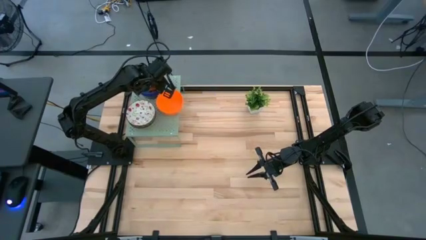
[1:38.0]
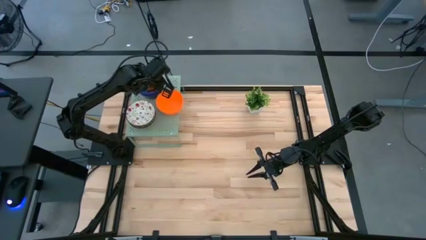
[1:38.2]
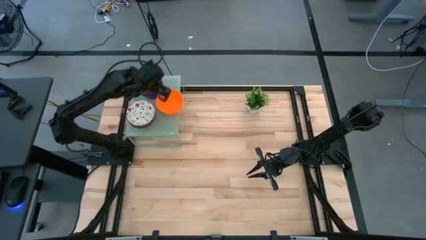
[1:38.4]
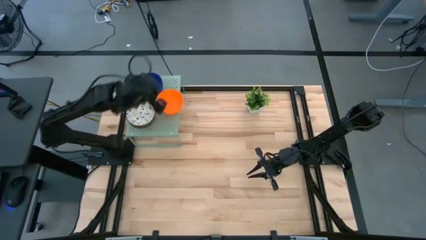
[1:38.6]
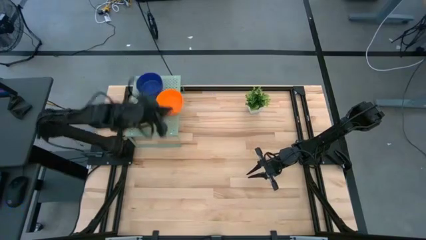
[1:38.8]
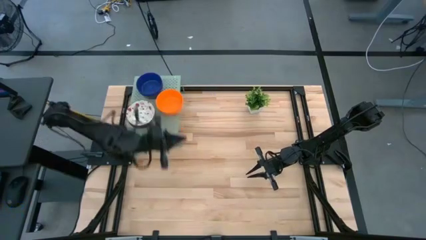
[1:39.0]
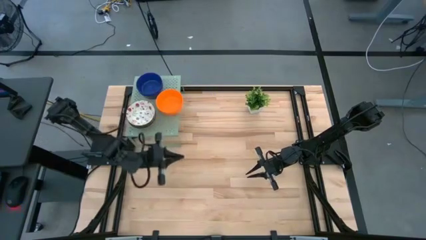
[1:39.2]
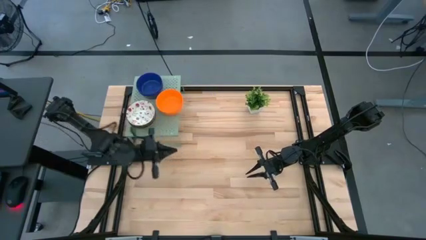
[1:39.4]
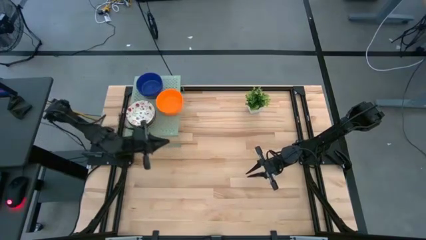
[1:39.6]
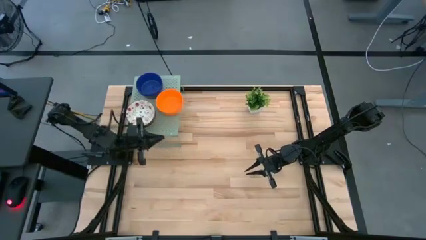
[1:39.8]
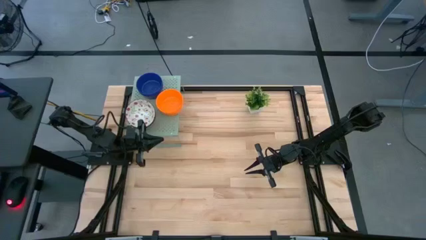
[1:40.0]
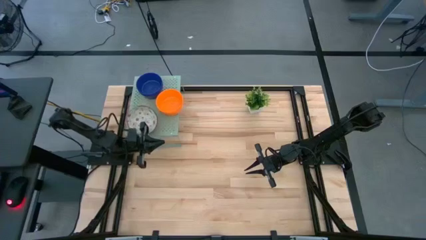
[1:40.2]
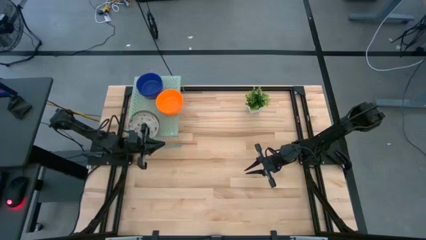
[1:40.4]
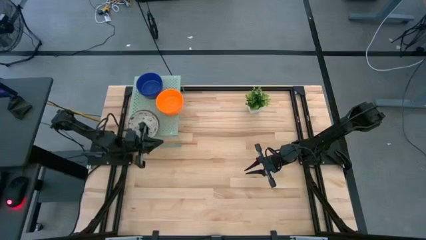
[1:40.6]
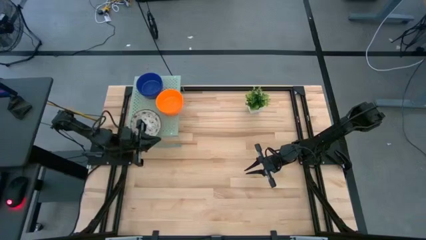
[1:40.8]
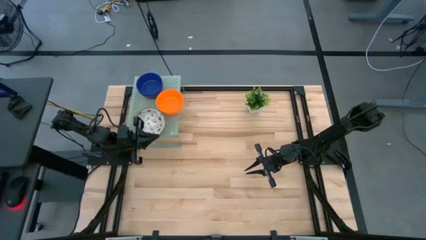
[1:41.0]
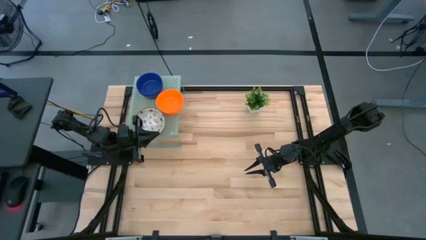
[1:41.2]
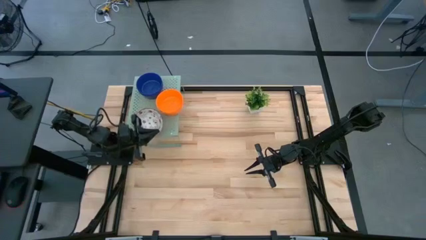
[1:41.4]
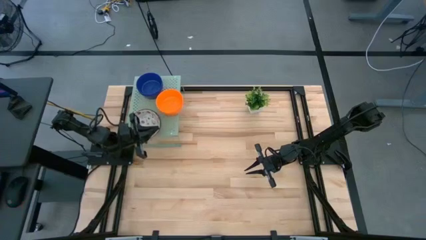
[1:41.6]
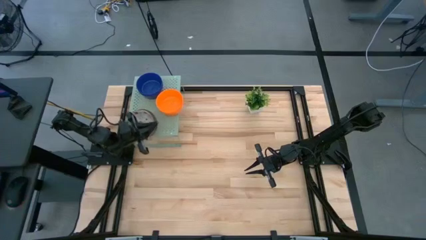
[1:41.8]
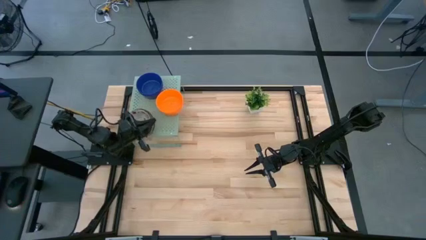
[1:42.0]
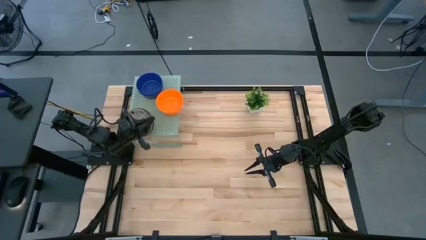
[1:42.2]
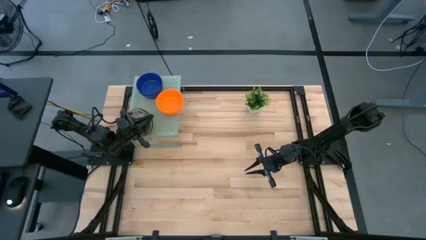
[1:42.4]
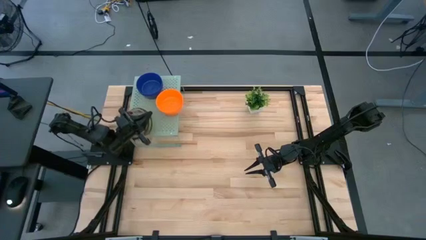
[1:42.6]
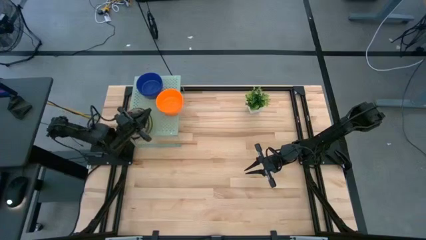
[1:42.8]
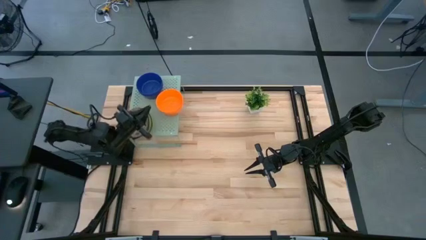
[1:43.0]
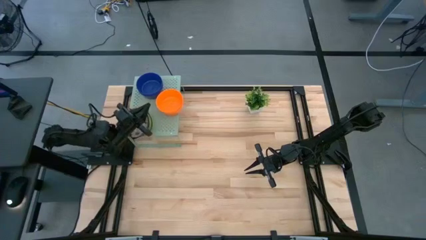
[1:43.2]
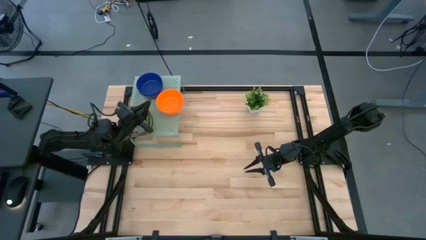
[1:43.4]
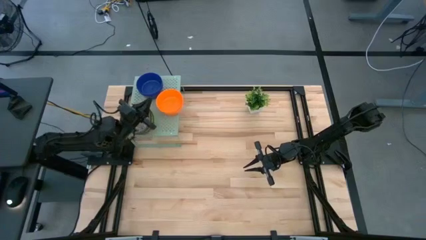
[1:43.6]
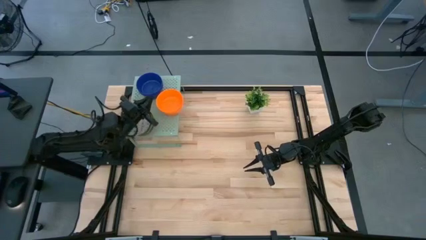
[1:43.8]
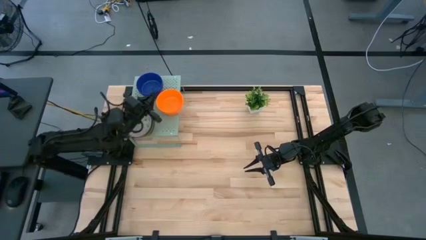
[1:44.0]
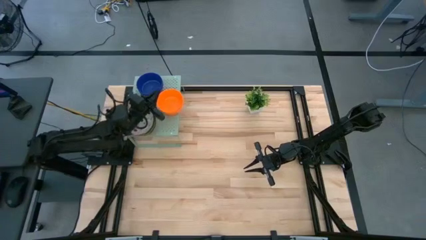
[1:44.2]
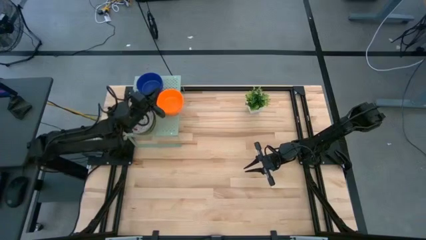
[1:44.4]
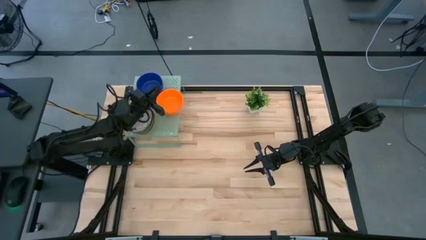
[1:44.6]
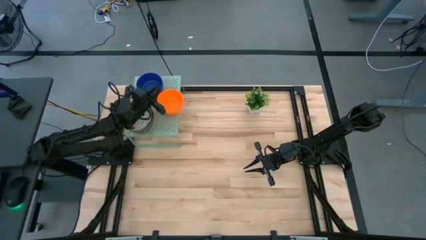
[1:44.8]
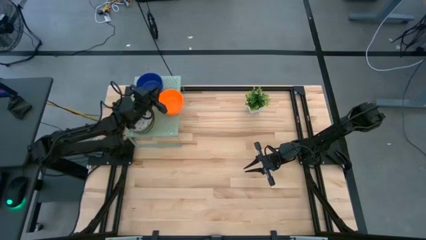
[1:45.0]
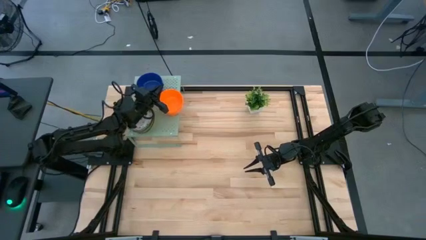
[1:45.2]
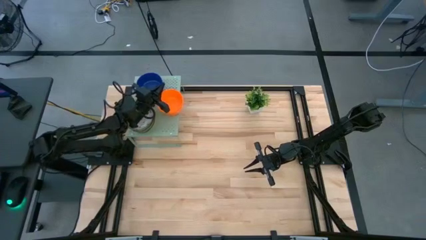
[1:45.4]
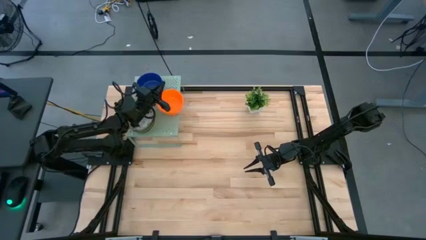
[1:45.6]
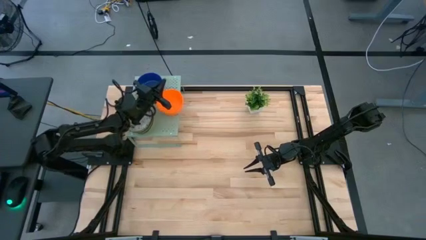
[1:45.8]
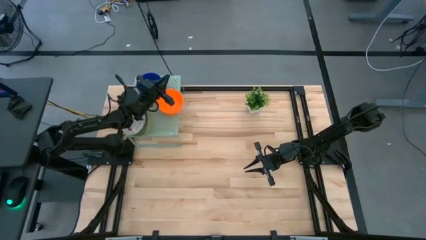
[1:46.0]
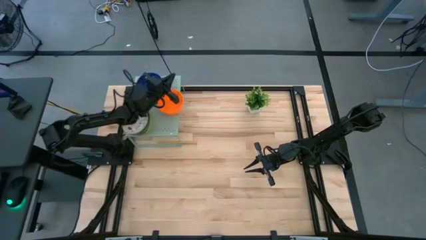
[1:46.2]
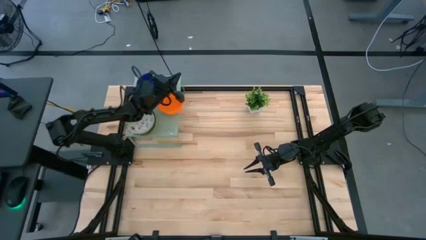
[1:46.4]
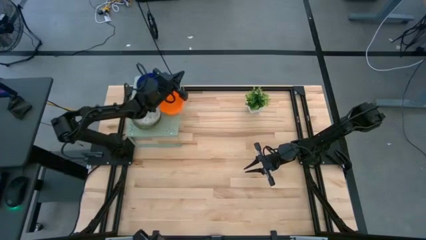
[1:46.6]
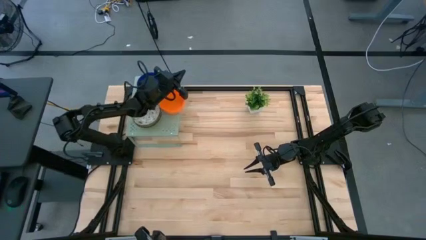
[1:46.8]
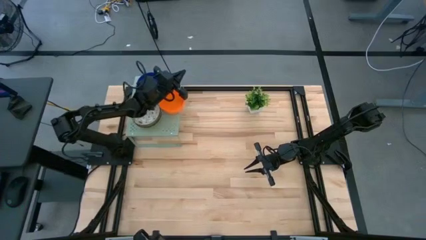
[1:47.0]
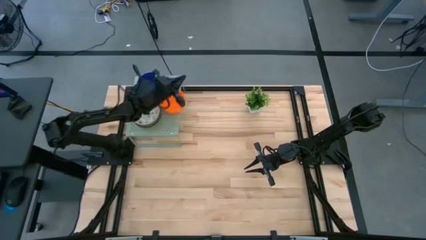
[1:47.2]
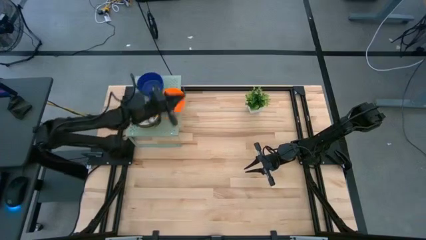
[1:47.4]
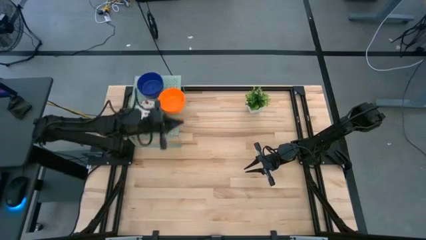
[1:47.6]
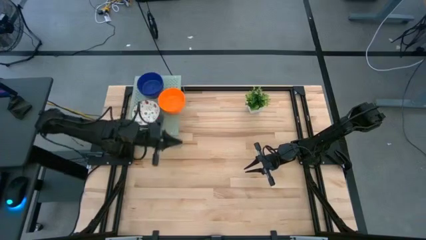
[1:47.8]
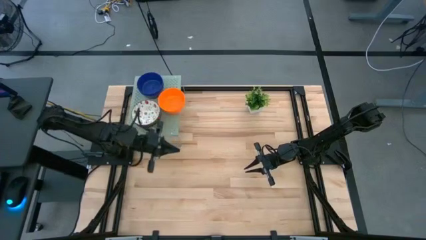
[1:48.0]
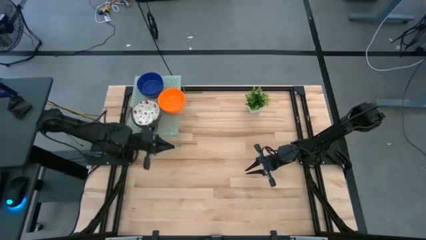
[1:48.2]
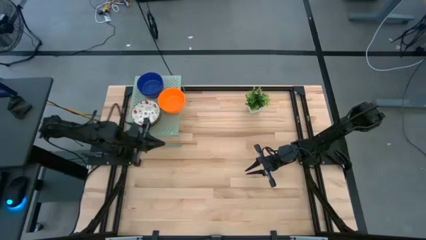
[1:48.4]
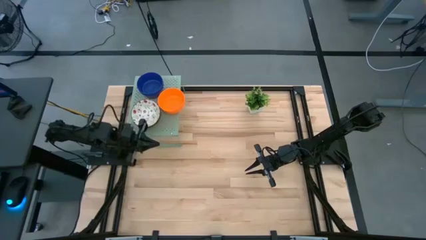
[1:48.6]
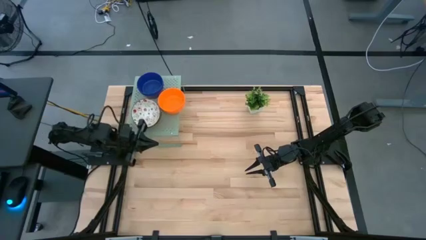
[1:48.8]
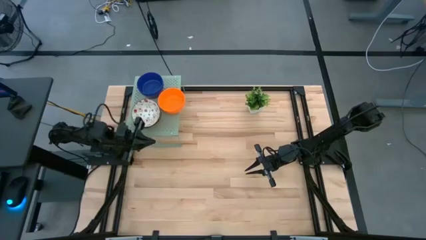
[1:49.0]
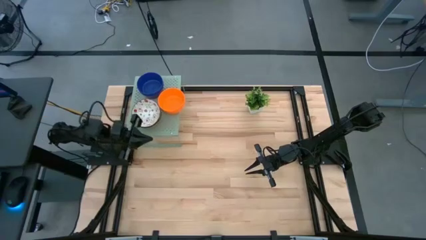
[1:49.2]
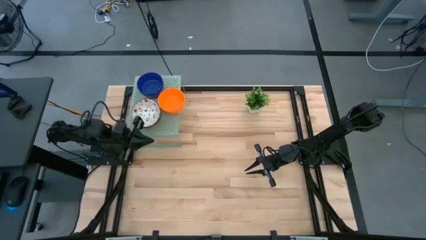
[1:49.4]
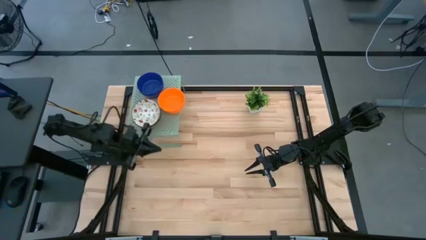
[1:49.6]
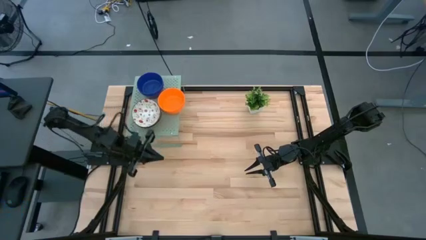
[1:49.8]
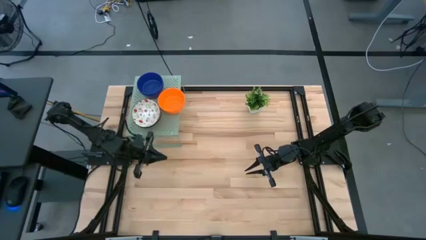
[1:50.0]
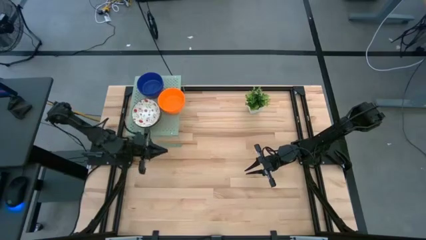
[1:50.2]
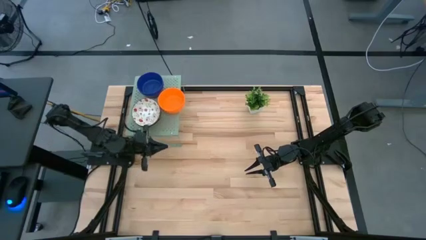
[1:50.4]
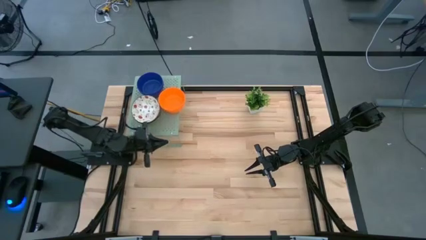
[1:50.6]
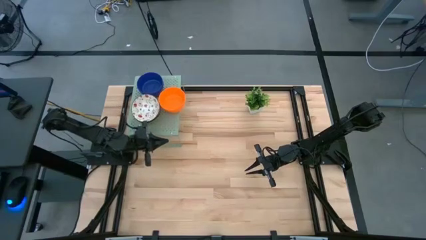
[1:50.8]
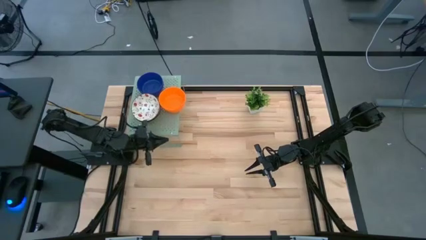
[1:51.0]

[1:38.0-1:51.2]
Task: Pick & Place Mini bowls
Adjust the stack of white bowls on the shelf
